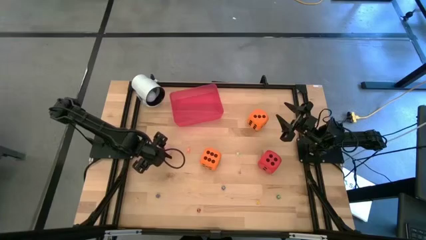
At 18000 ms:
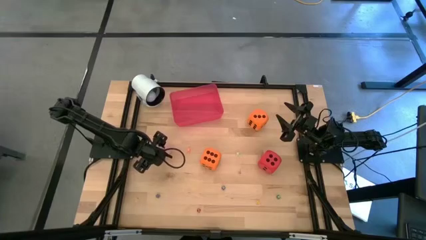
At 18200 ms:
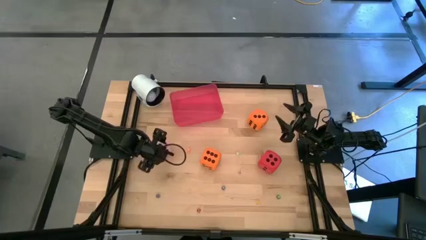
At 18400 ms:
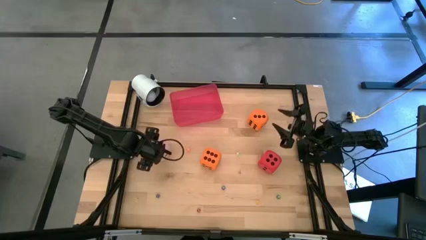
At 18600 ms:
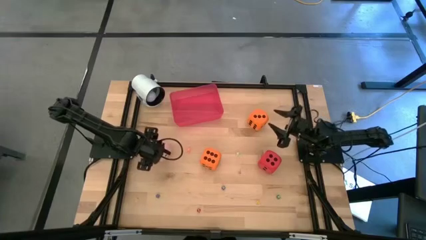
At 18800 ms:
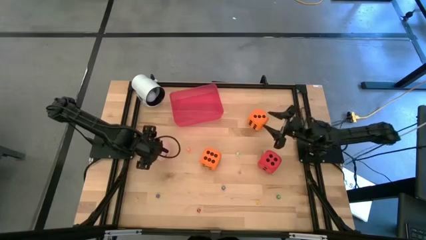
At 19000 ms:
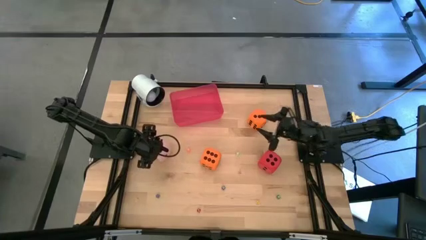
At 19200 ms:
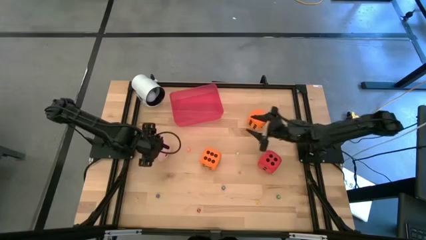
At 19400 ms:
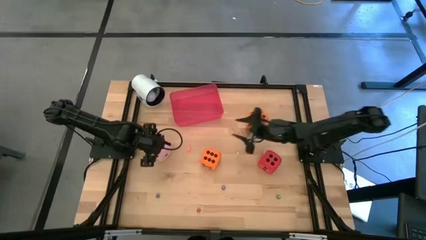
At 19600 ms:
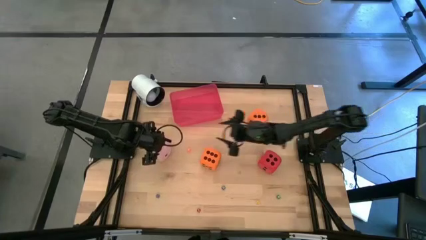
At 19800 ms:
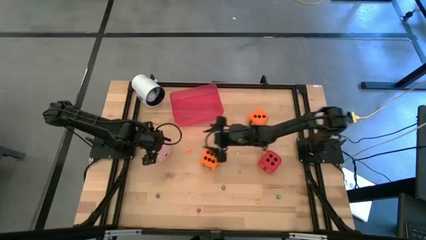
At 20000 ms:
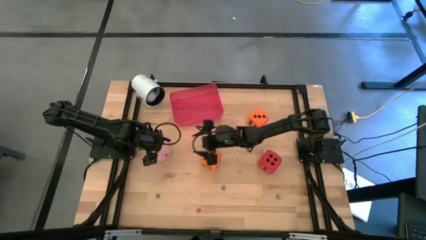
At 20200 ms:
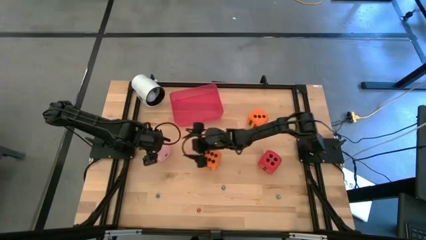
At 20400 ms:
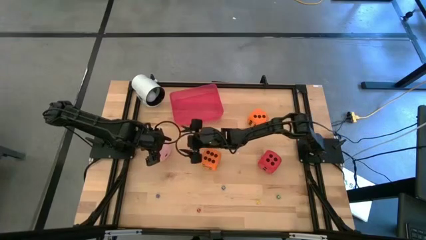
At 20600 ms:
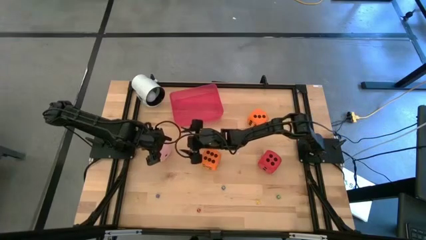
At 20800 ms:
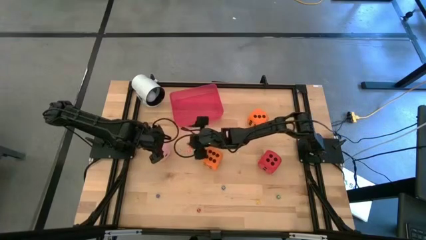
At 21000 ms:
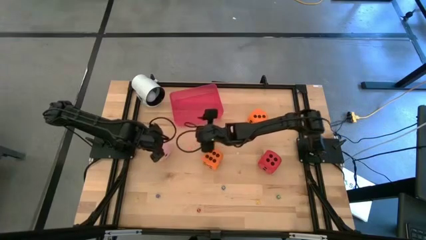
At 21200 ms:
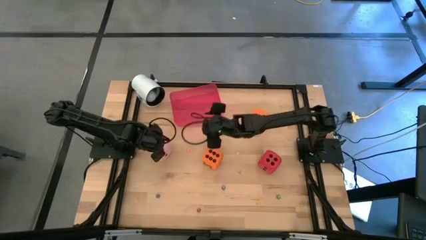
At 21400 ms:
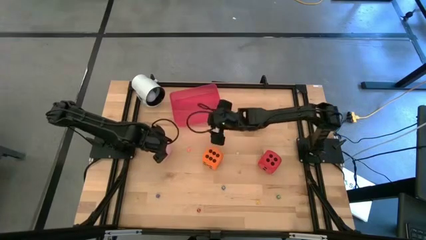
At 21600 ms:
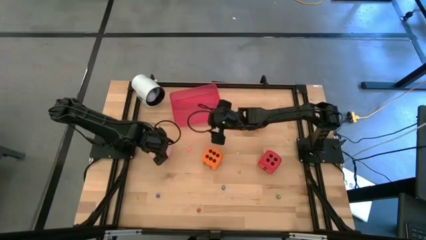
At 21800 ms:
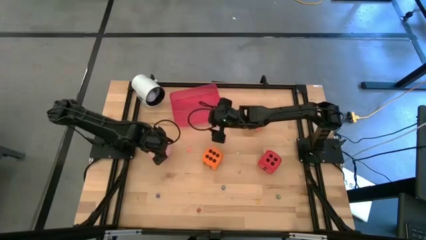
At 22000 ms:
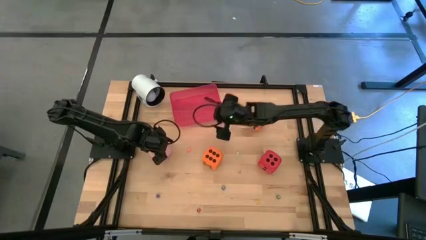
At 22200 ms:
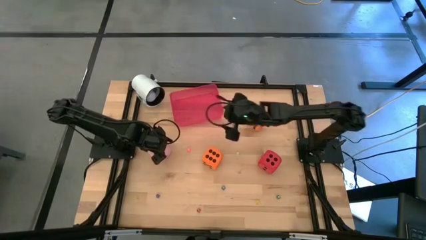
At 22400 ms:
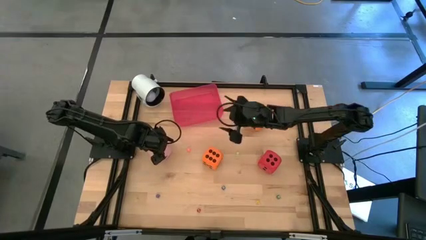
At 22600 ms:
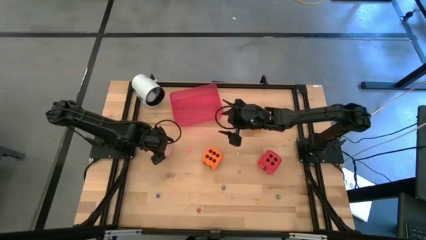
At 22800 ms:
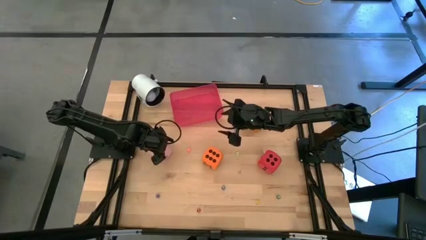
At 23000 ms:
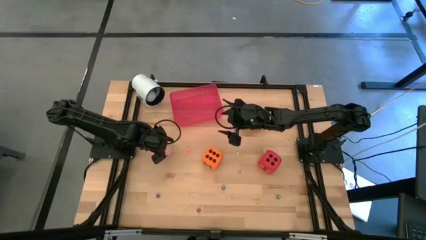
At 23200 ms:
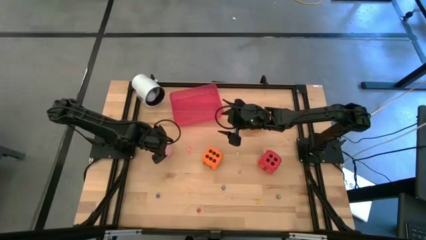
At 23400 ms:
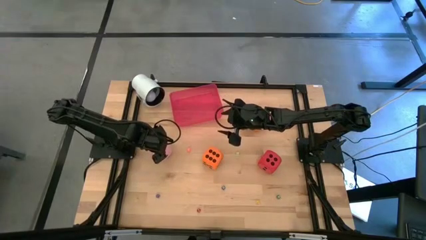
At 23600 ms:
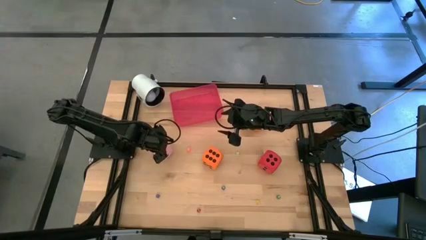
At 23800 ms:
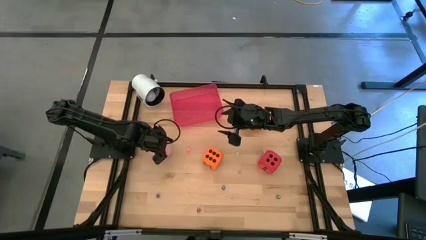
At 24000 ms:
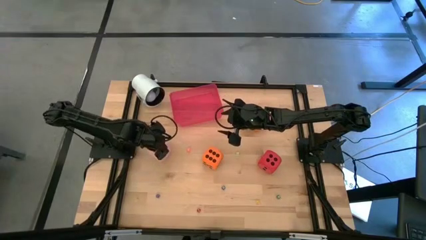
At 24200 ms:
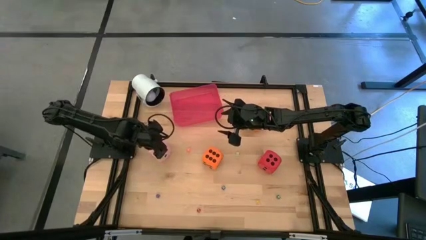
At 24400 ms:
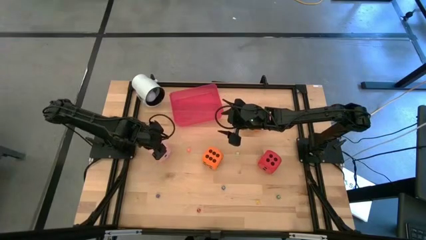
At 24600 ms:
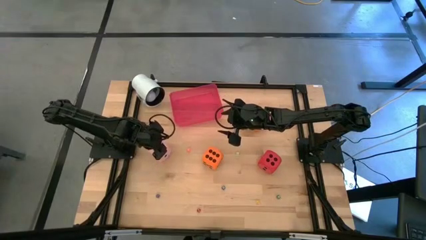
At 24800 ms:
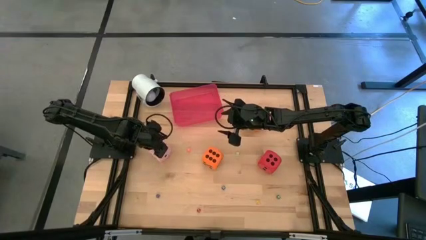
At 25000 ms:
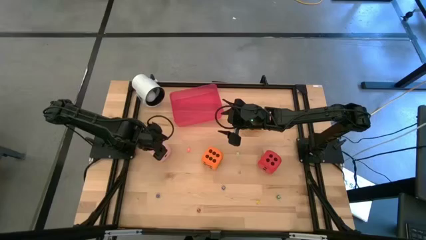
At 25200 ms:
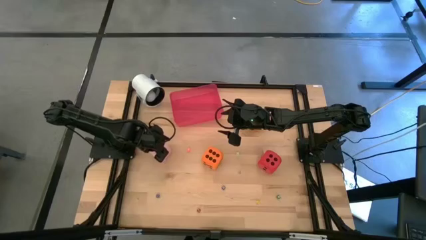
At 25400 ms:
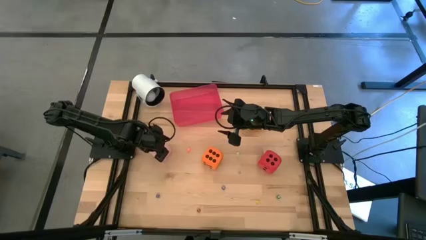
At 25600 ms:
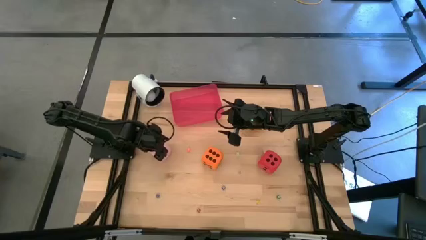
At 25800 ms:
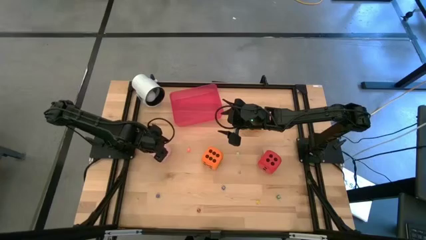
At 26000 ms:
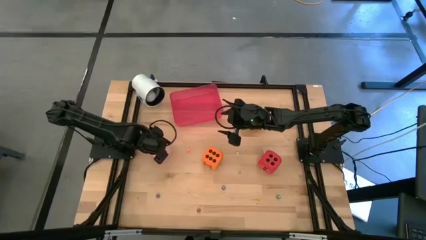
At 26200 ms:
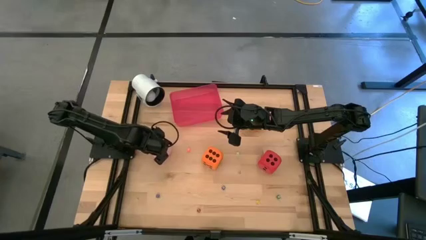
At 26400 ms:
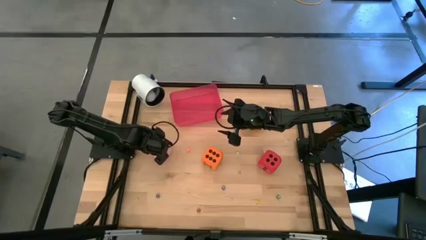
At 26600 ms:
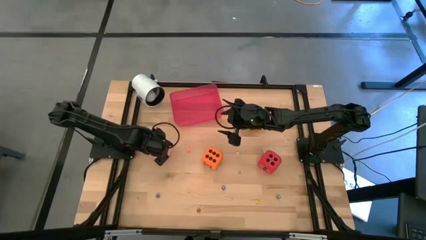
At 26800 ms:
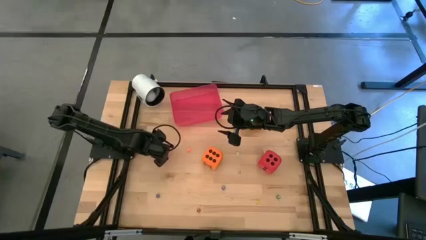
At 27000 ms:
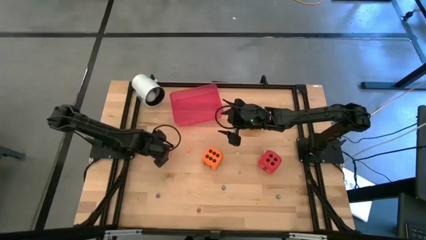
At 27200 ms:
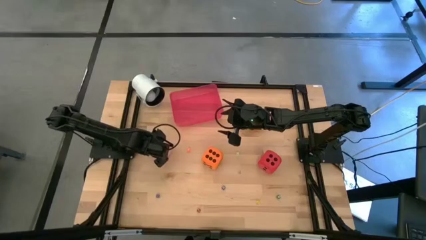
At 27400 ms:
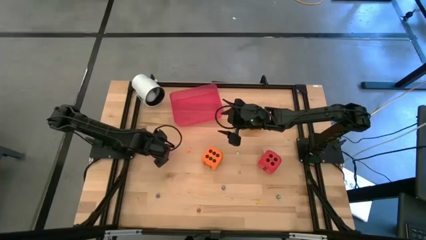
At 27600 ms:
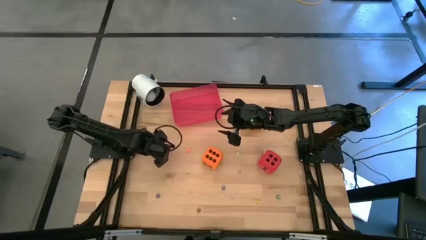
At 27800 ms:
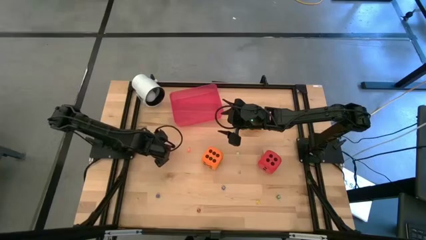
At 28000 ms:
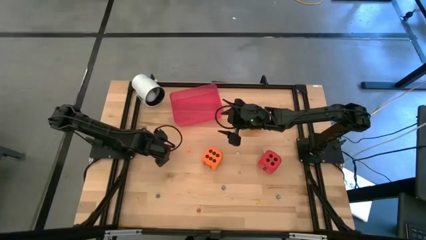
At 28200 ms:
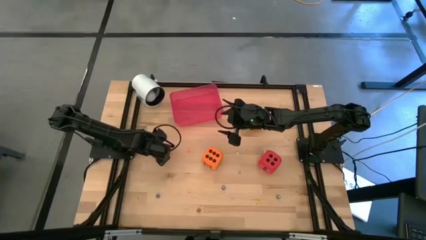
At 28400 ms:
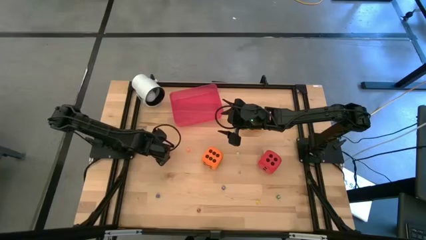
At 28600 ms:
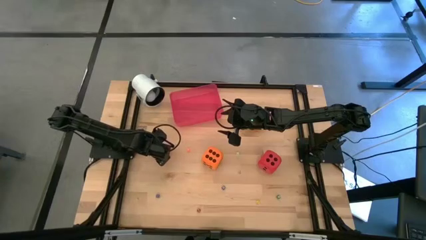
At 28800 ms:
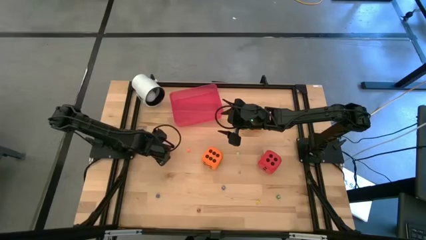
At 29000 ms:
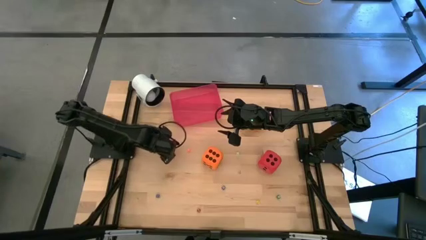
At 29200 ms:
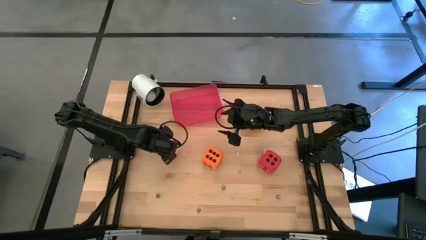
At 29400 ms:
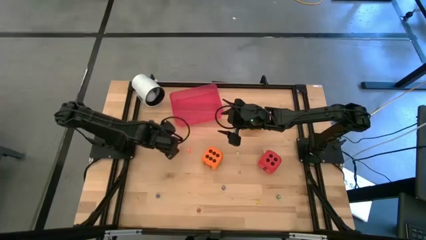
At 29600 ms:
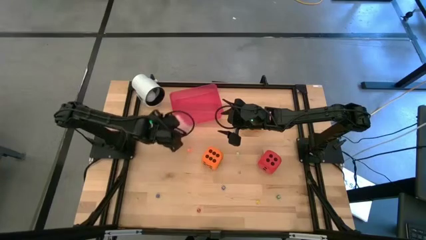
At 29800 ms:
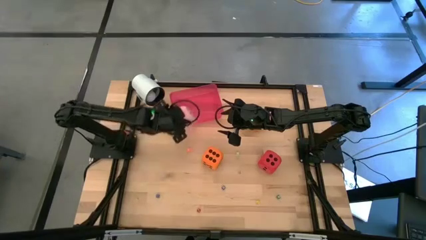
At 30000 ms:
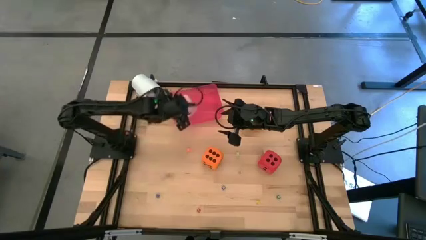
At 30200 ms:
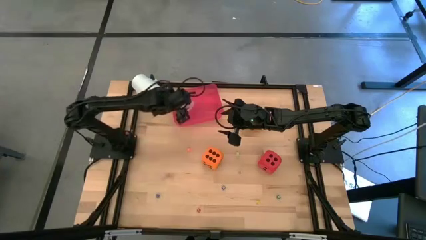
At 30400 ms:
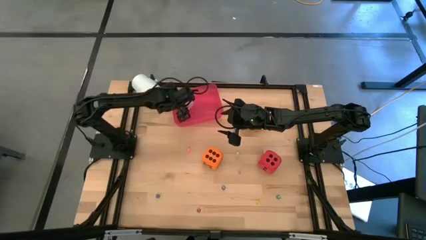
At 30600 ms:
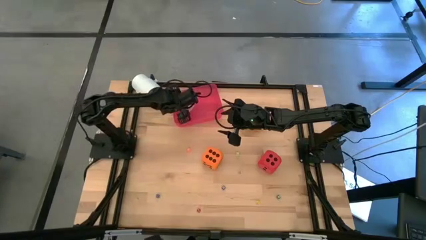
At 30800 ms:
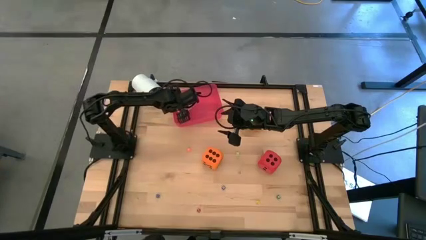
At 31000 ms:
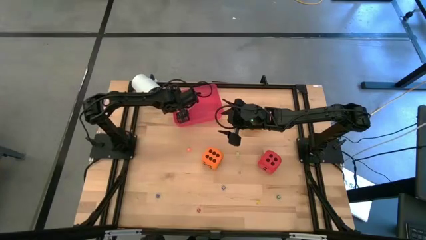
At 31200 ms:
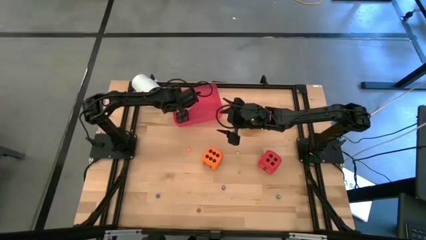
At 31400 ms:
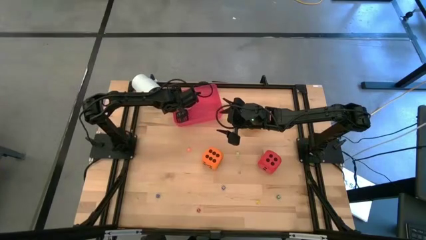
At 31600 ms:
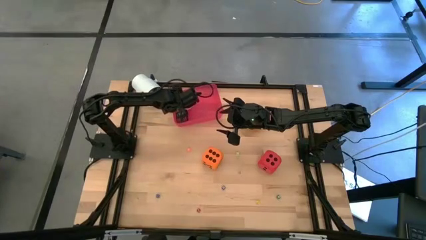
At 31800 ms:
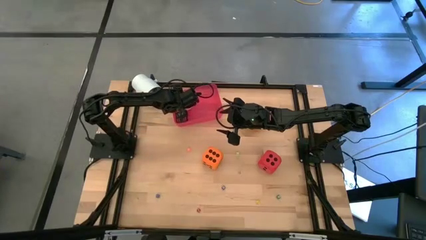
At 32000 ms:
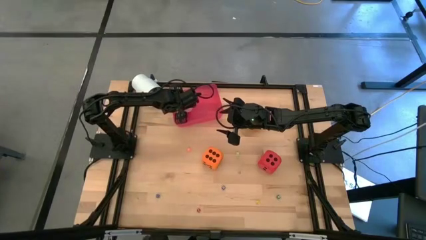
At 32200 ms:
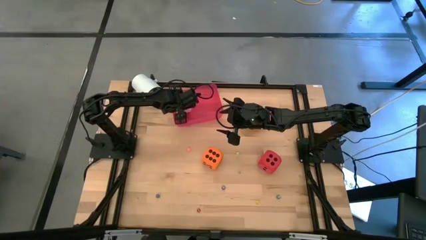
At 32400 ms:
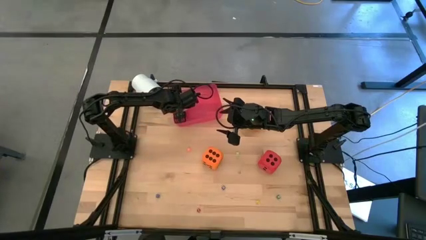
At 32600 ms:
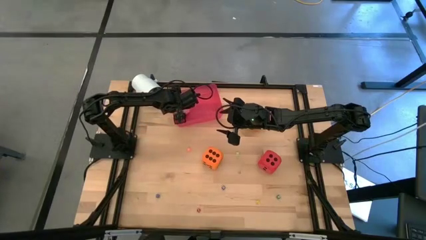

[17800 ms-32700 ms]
Task: Pick & Place Dice
Put the large pink die into the red bin
